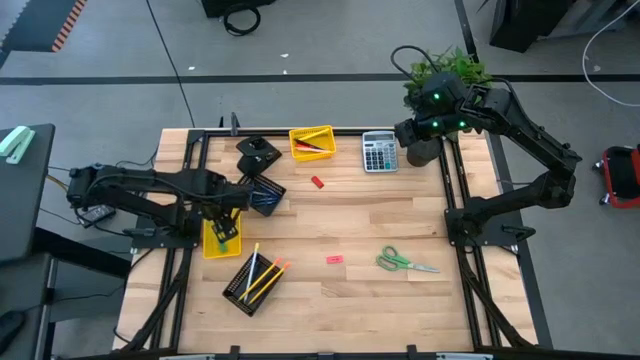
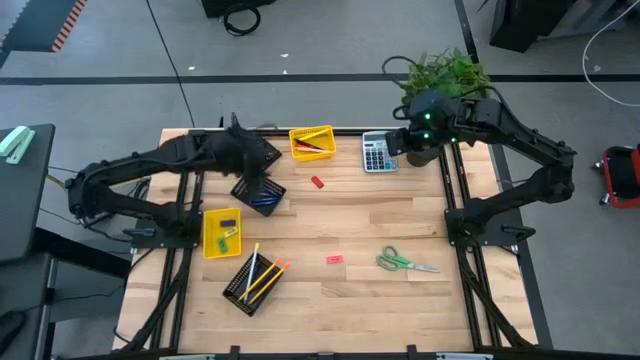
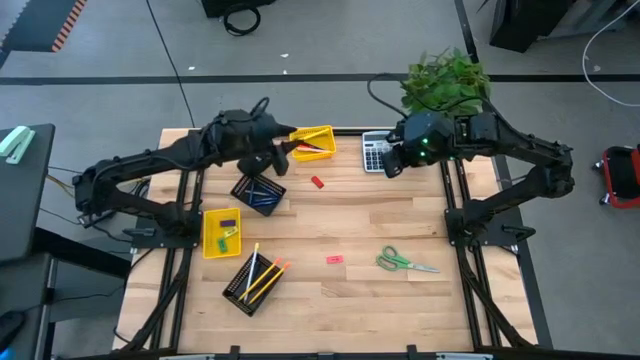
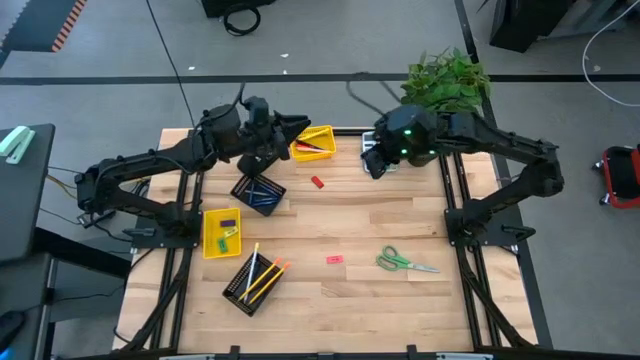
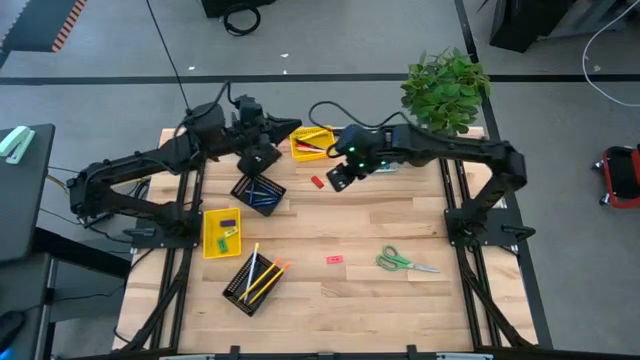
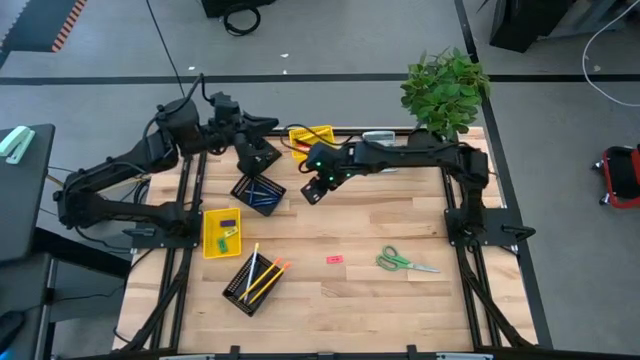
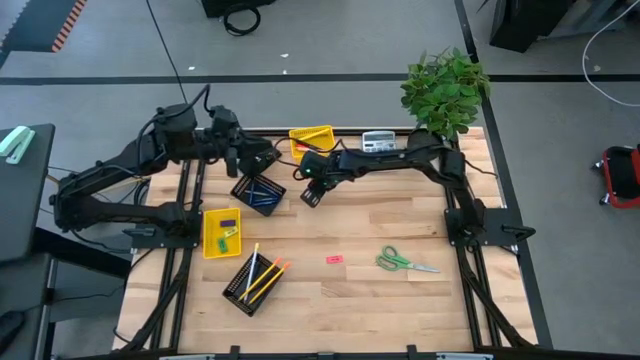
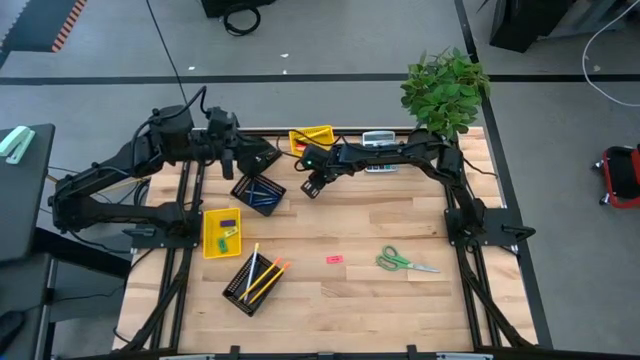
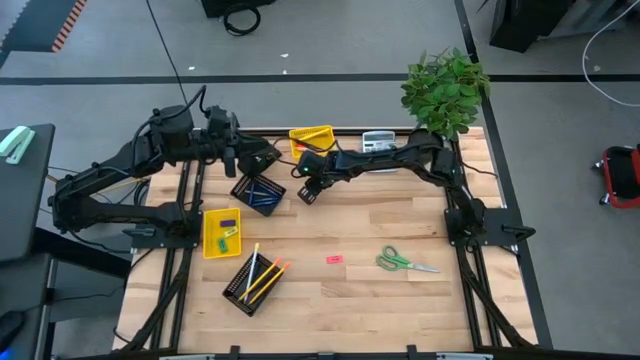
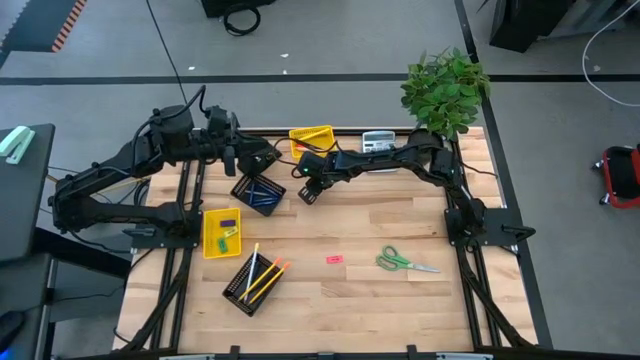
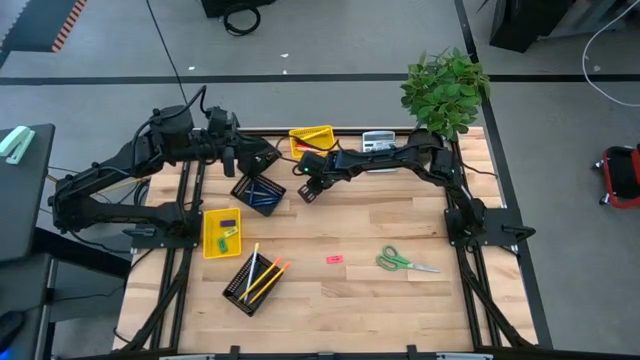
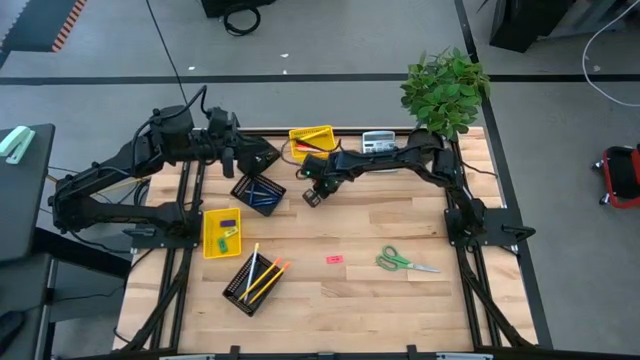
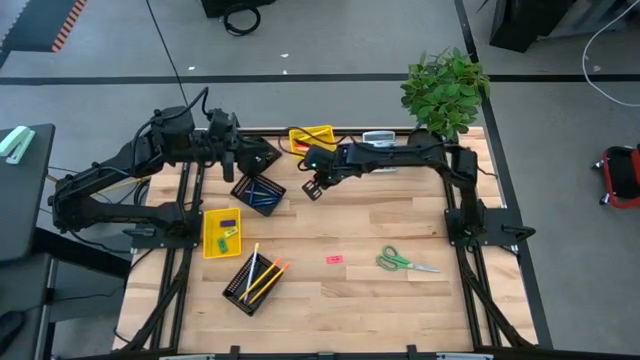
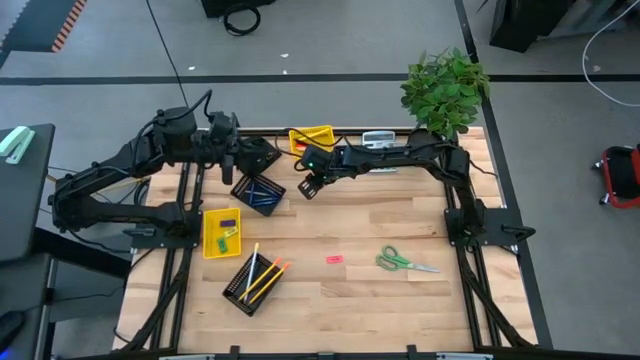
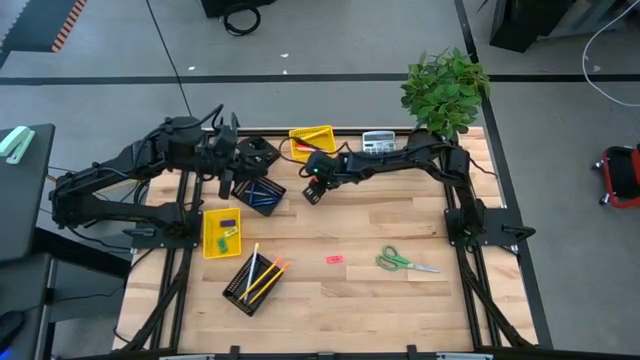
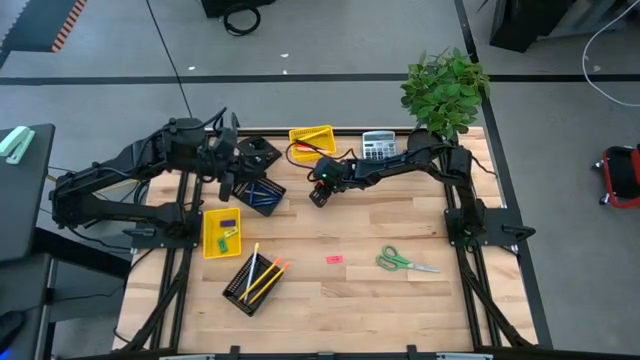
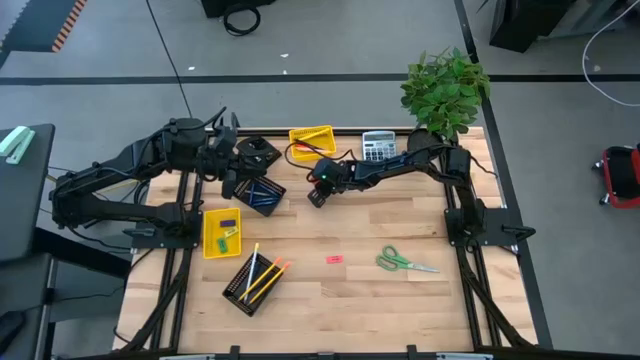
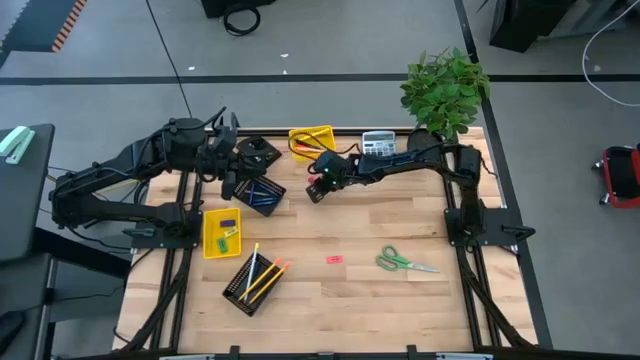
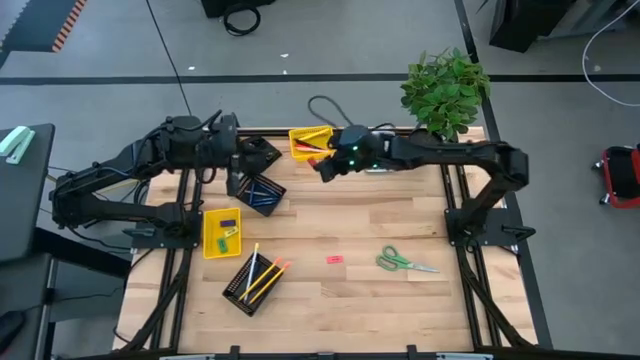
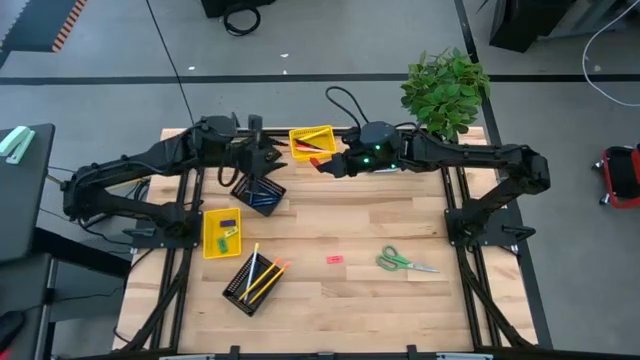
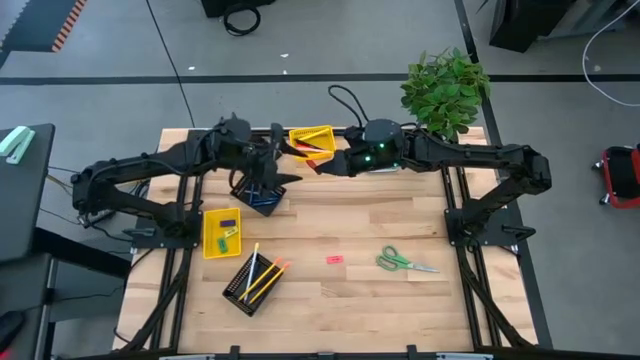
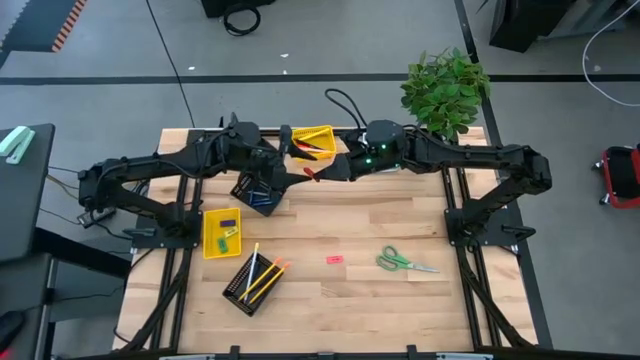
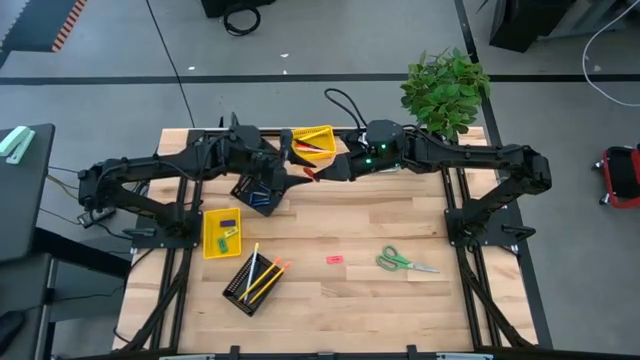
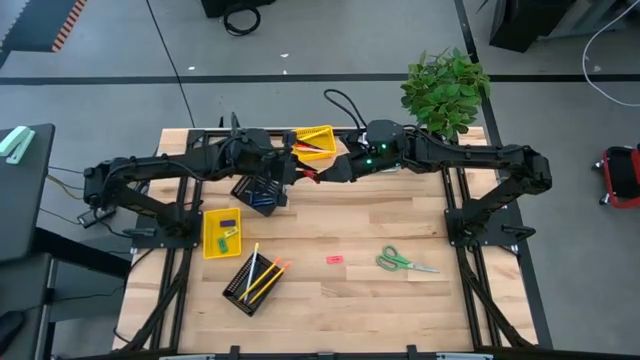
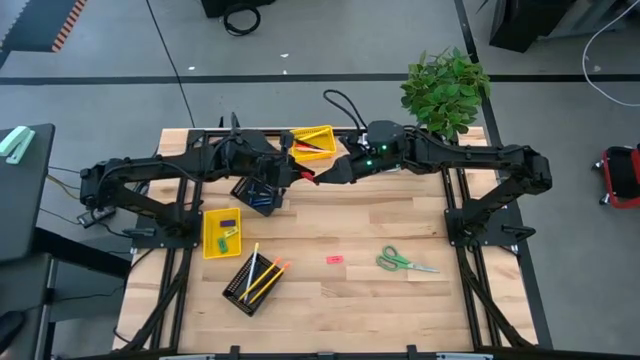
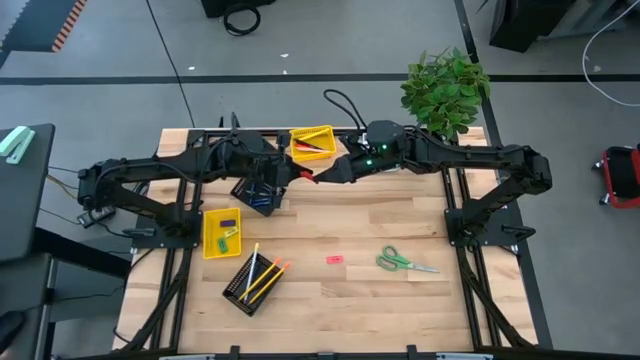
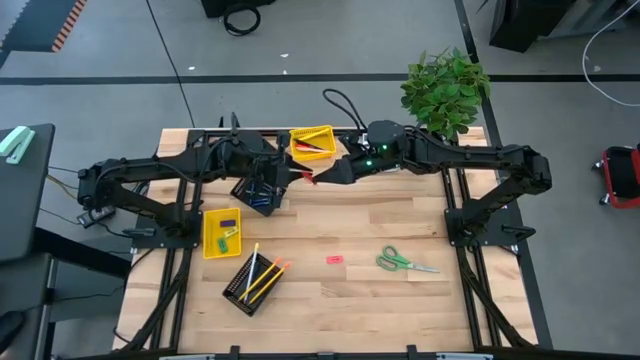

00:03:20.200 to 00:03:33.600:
Task: Sort crayons/erasers/pens/pencils in bins
Put the red eraser into the bottom yellow basket

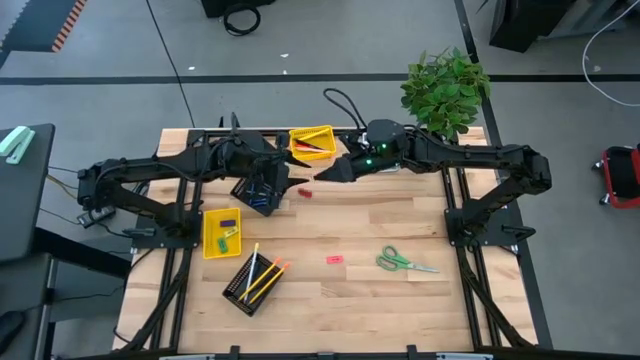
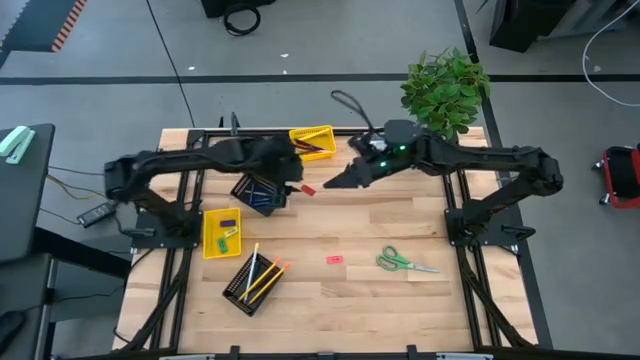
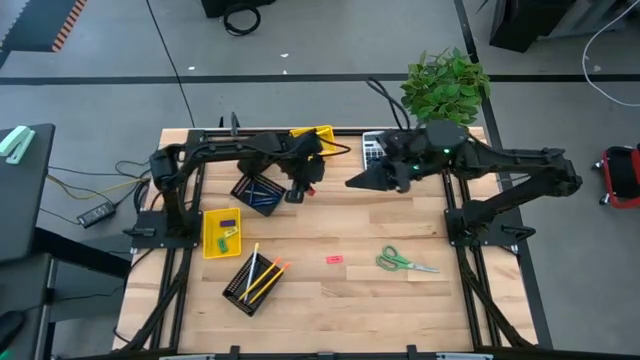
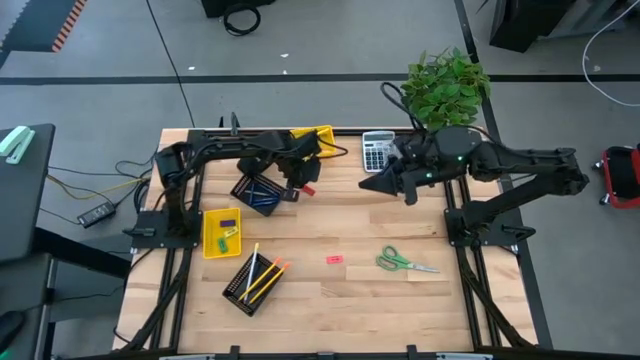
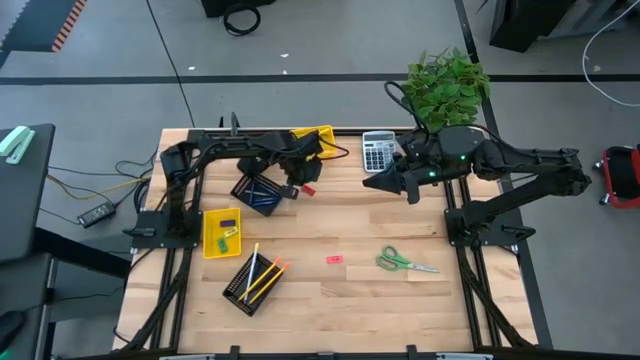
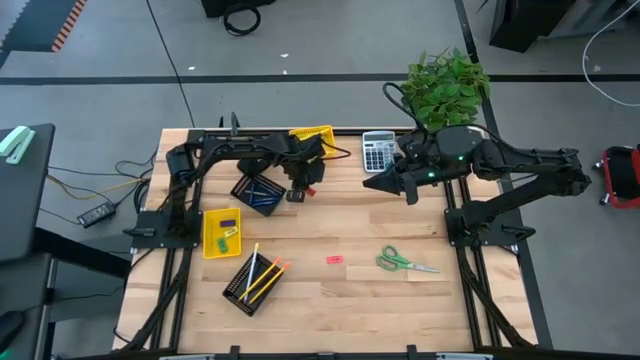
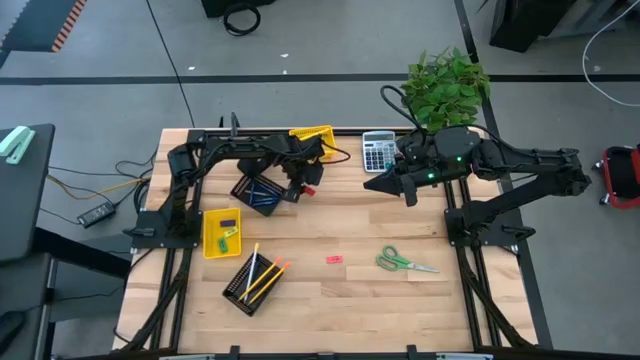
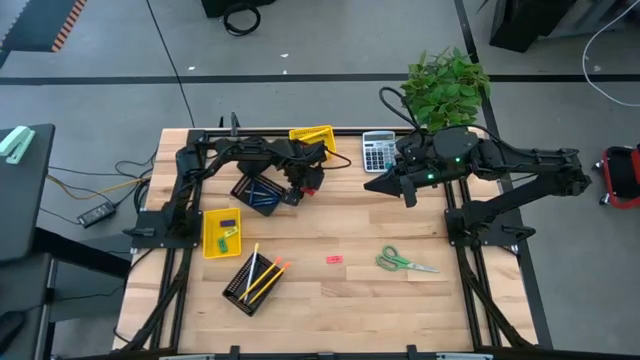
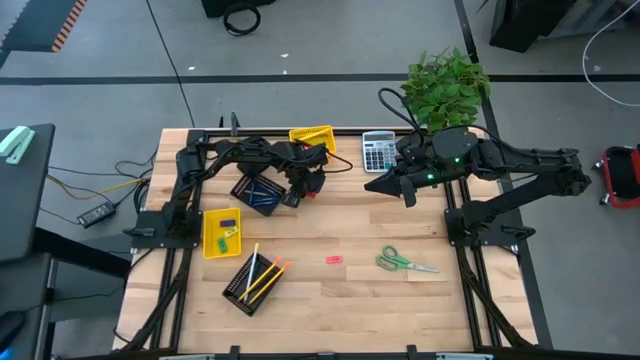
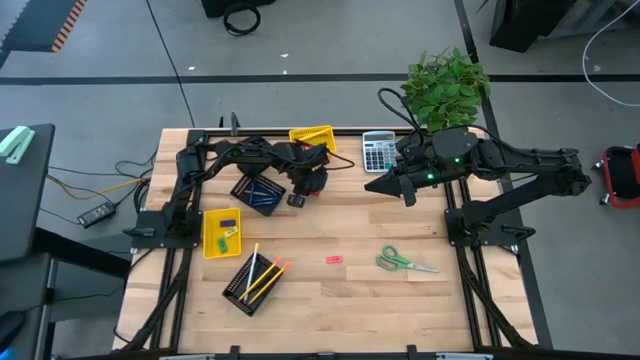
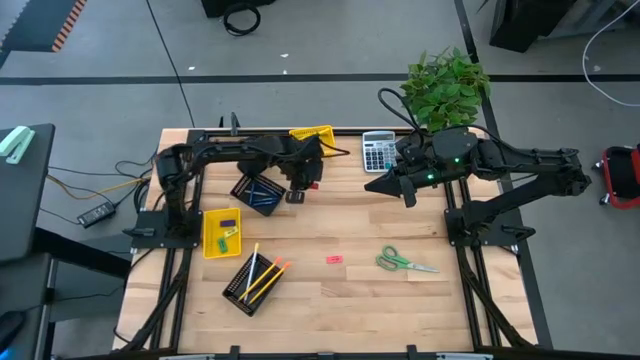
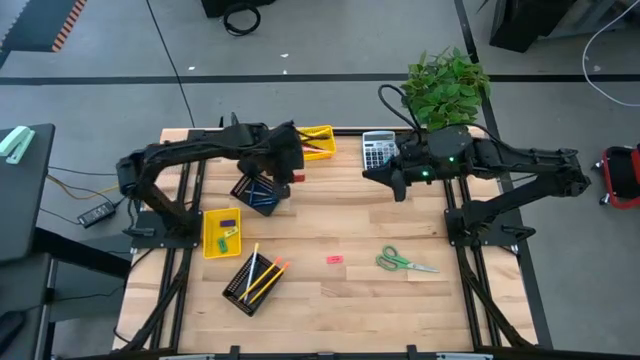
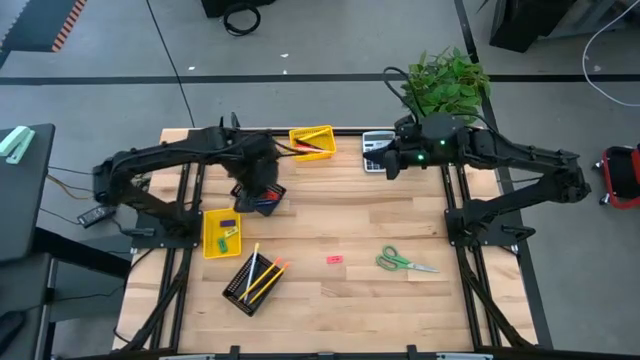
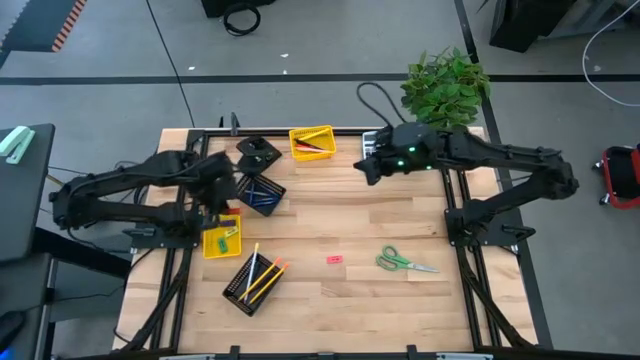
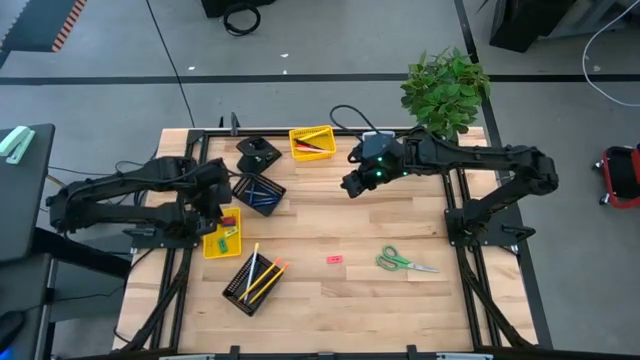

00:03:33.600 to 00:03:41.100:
Put the red eraser into the bottom yellow basket
